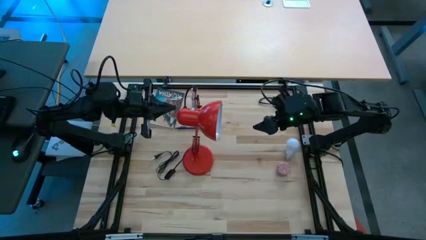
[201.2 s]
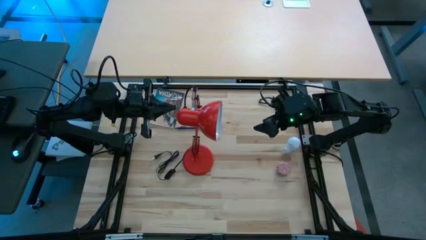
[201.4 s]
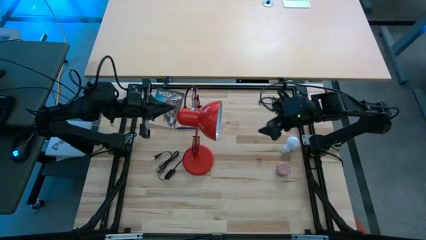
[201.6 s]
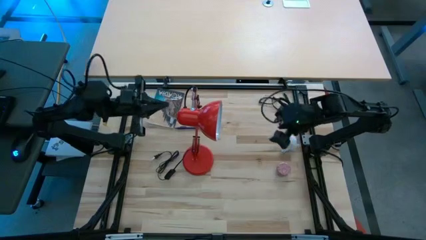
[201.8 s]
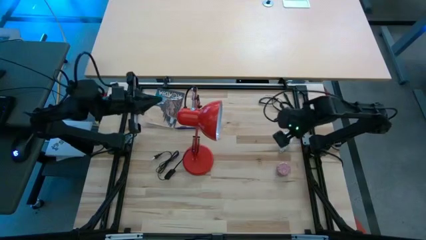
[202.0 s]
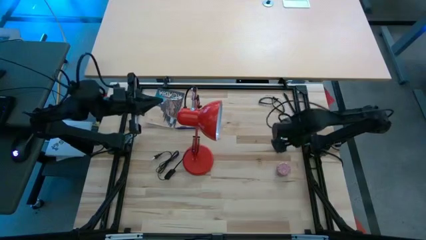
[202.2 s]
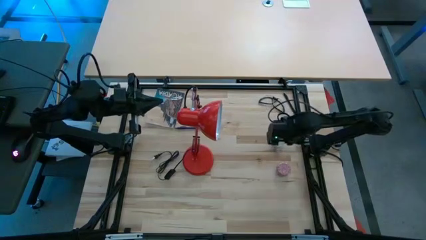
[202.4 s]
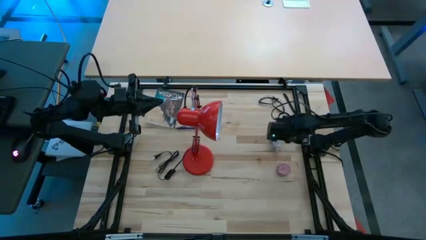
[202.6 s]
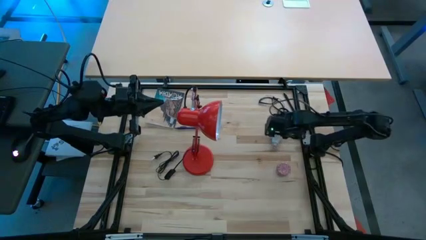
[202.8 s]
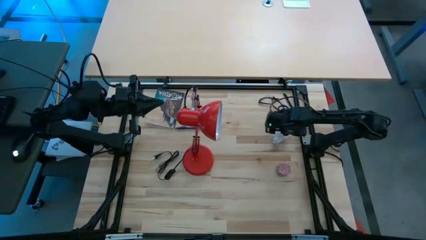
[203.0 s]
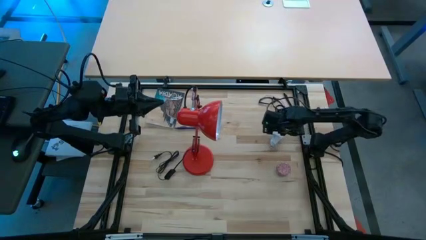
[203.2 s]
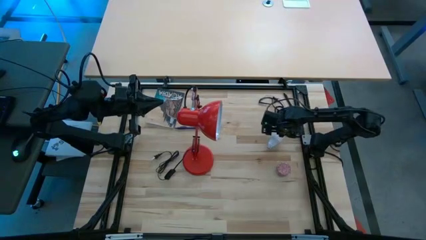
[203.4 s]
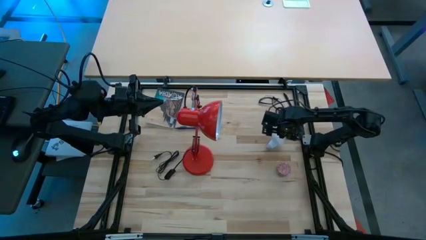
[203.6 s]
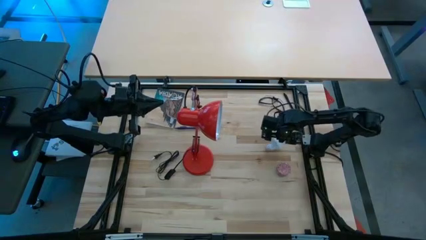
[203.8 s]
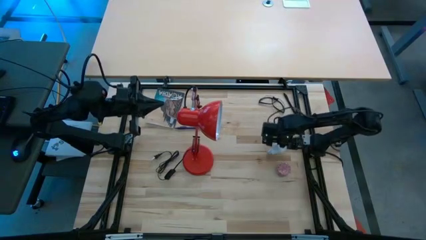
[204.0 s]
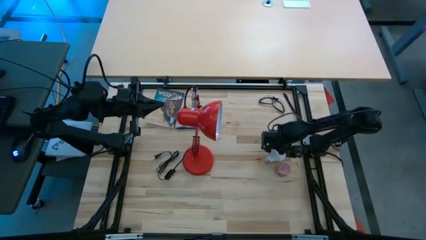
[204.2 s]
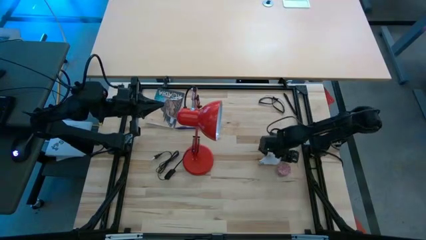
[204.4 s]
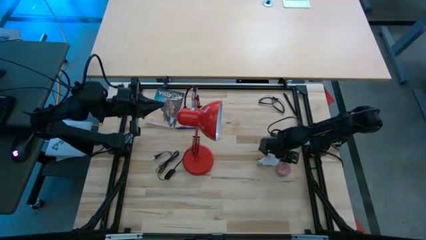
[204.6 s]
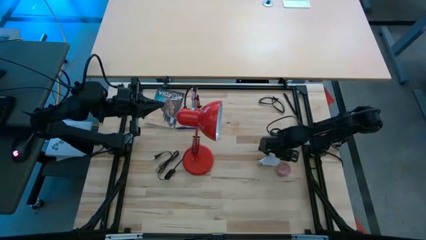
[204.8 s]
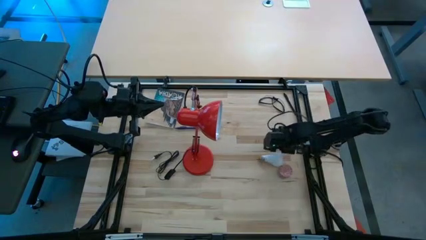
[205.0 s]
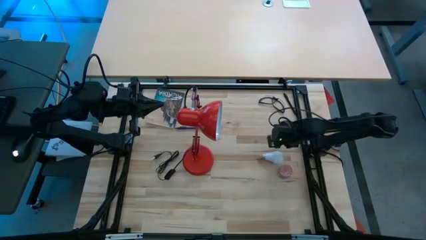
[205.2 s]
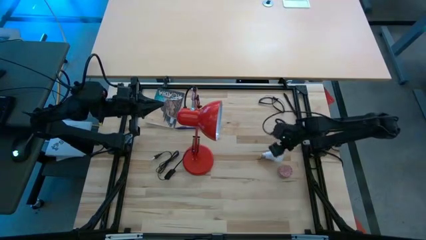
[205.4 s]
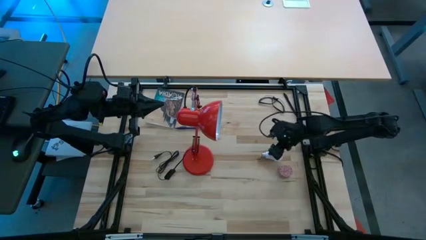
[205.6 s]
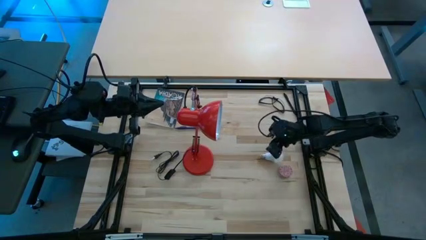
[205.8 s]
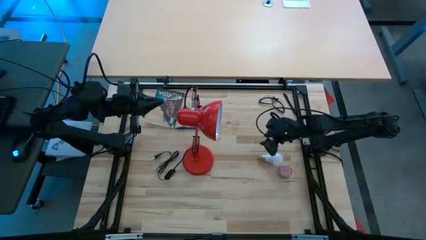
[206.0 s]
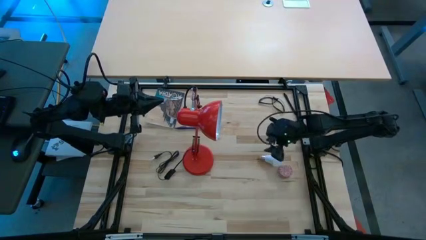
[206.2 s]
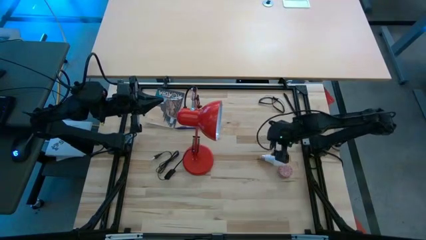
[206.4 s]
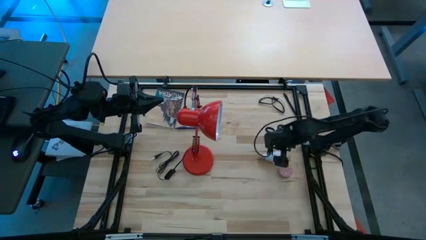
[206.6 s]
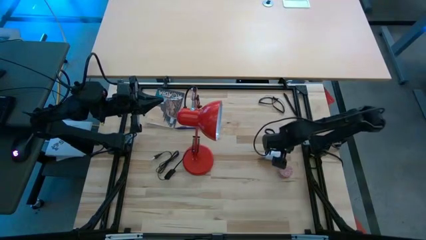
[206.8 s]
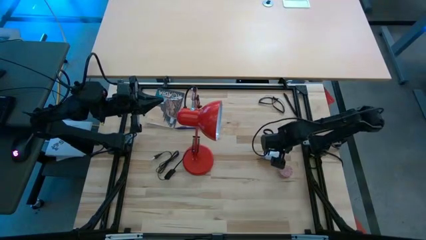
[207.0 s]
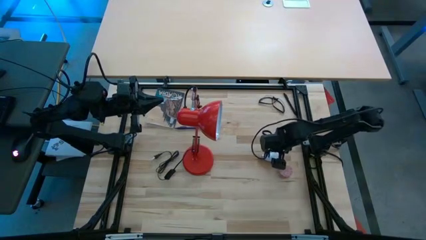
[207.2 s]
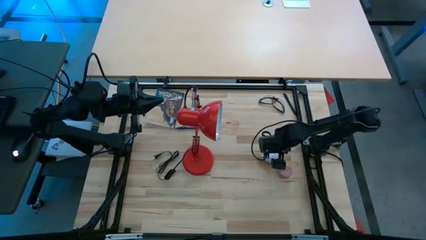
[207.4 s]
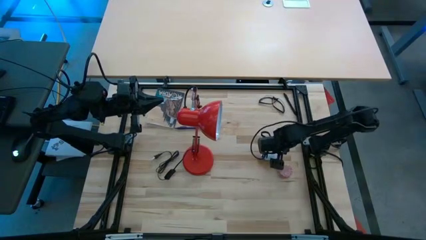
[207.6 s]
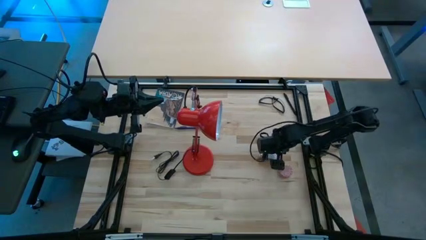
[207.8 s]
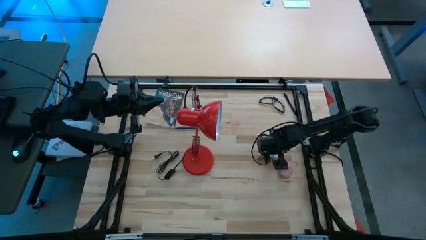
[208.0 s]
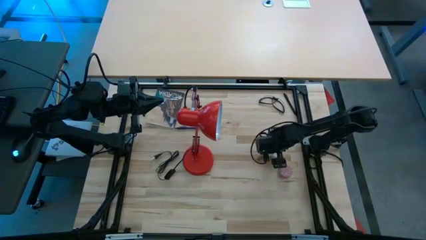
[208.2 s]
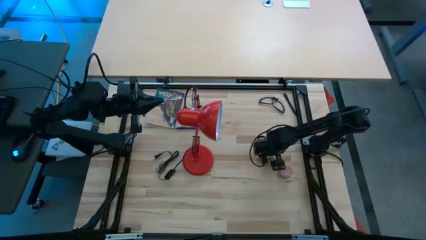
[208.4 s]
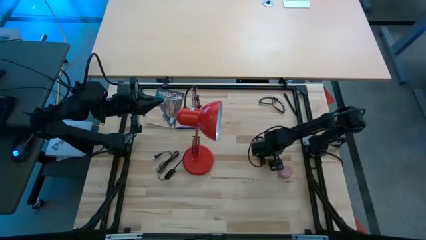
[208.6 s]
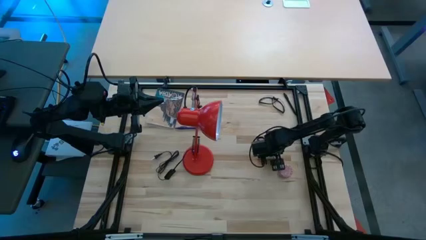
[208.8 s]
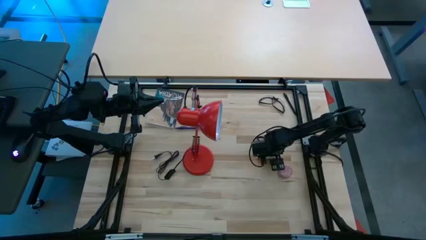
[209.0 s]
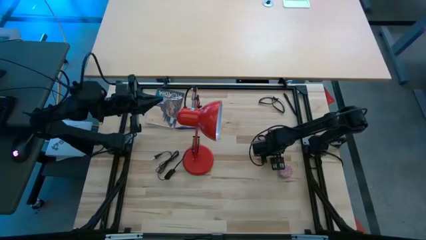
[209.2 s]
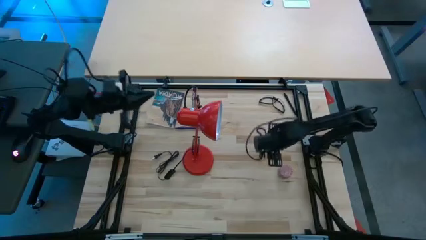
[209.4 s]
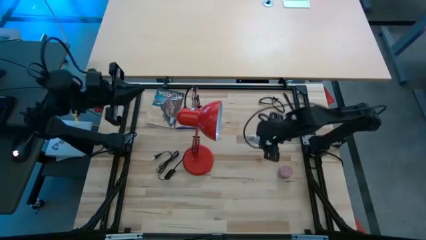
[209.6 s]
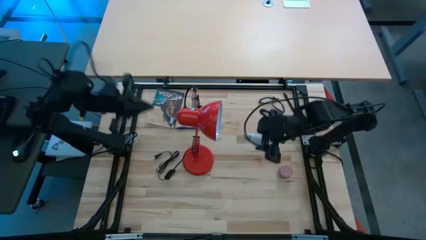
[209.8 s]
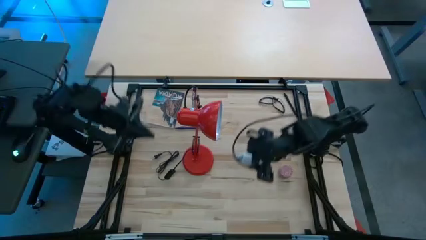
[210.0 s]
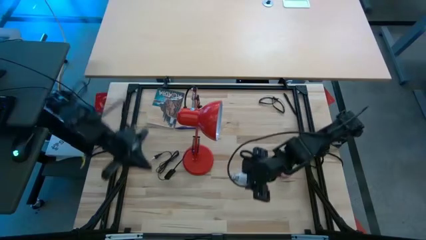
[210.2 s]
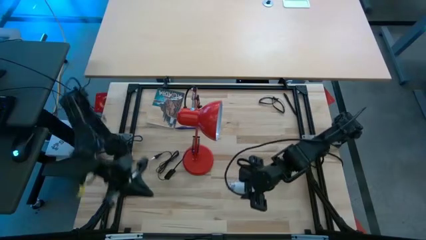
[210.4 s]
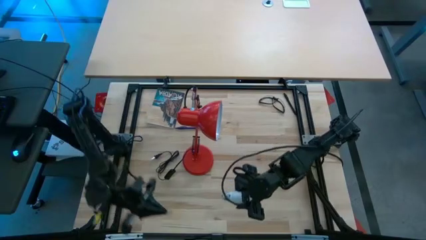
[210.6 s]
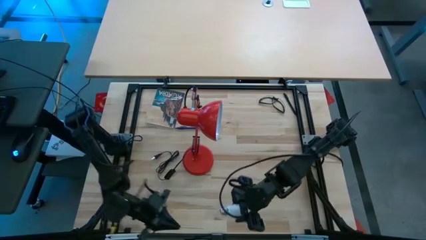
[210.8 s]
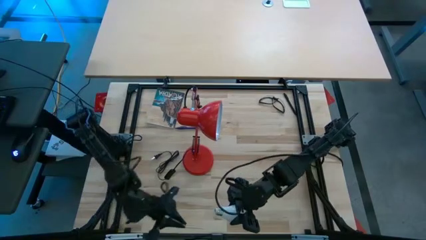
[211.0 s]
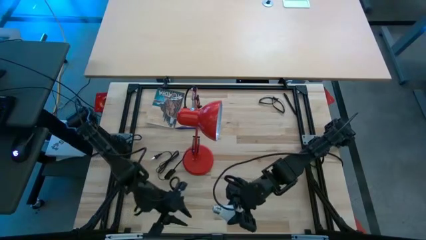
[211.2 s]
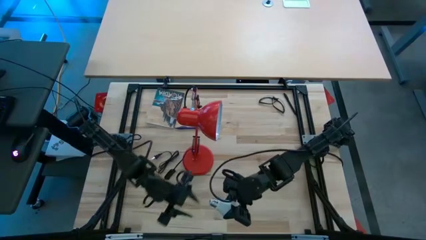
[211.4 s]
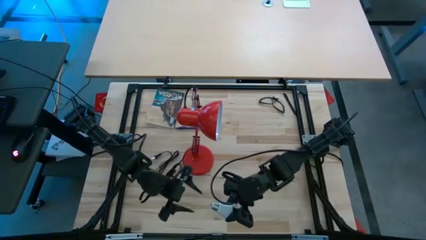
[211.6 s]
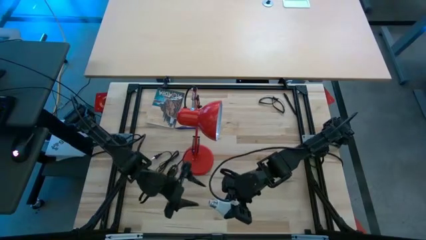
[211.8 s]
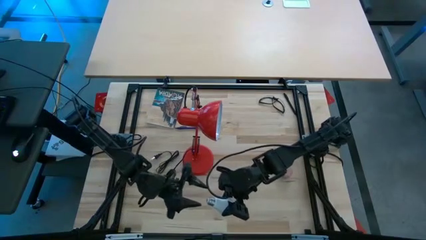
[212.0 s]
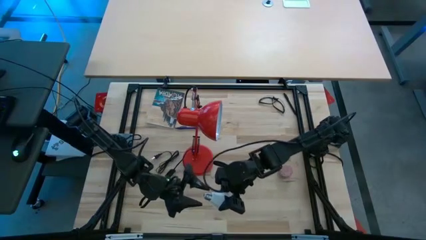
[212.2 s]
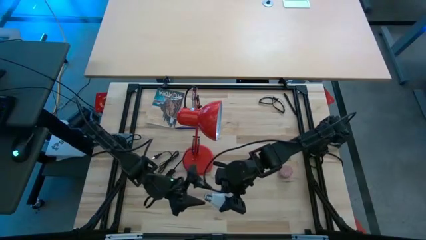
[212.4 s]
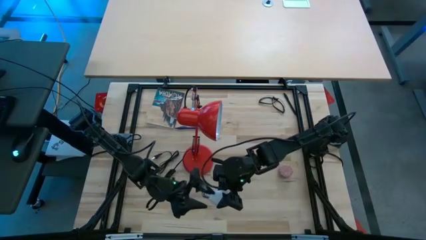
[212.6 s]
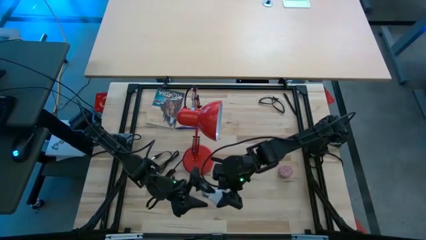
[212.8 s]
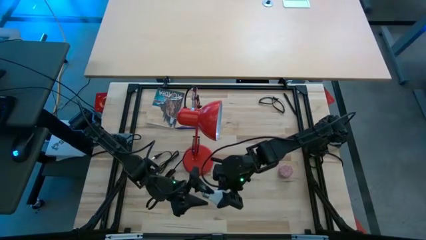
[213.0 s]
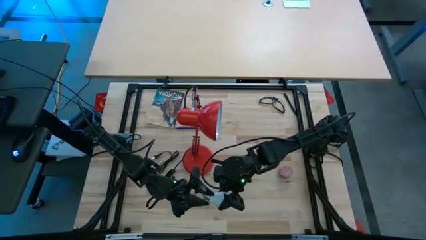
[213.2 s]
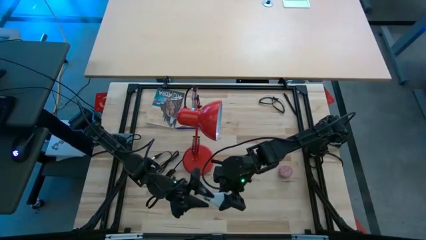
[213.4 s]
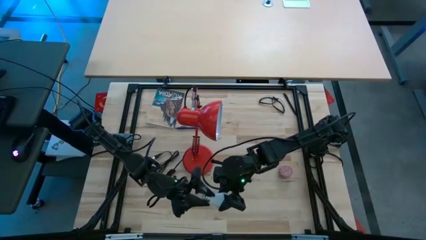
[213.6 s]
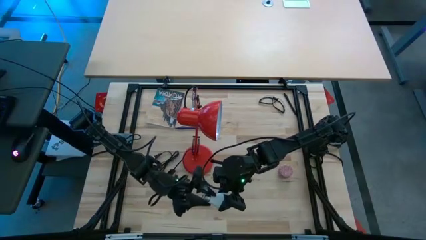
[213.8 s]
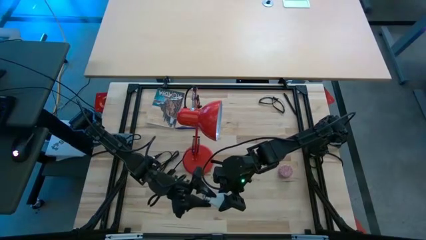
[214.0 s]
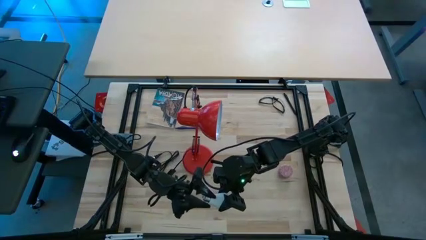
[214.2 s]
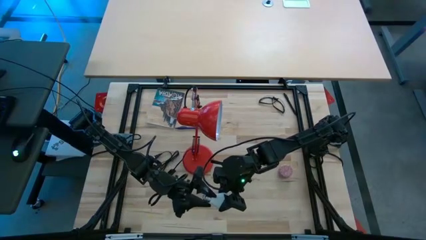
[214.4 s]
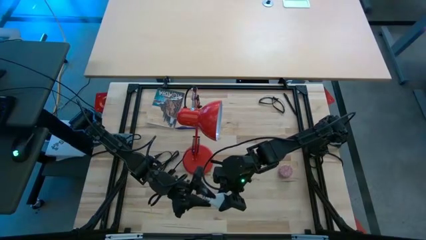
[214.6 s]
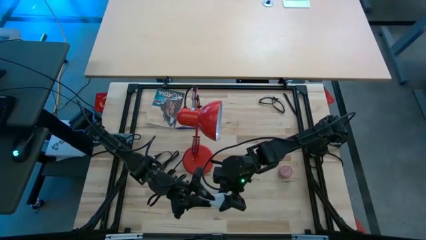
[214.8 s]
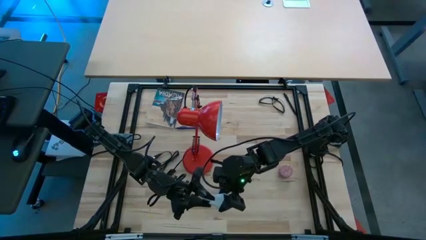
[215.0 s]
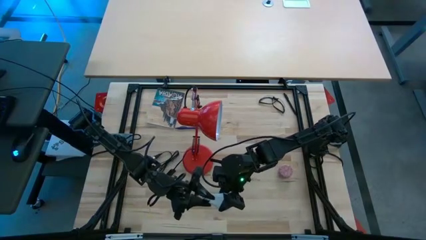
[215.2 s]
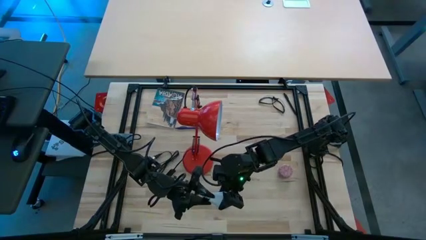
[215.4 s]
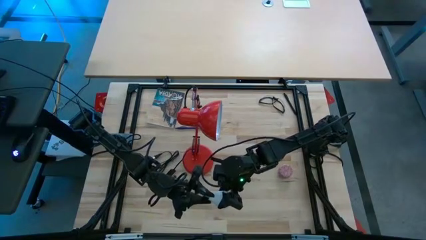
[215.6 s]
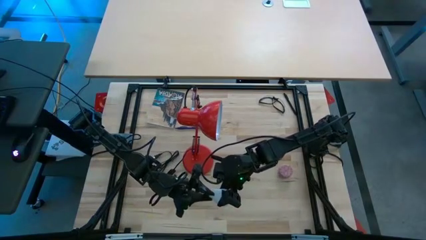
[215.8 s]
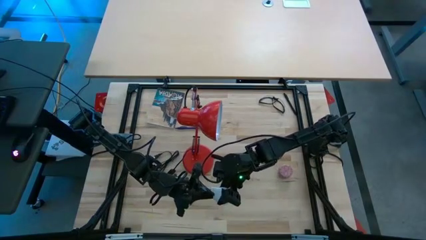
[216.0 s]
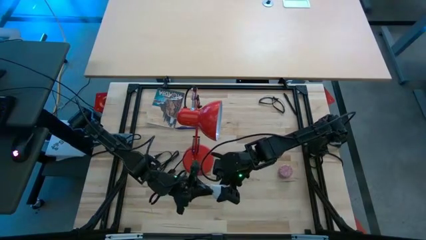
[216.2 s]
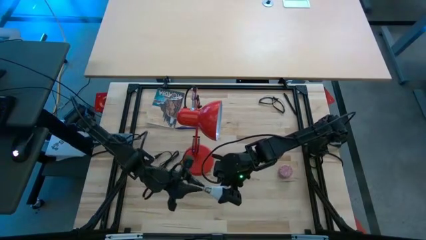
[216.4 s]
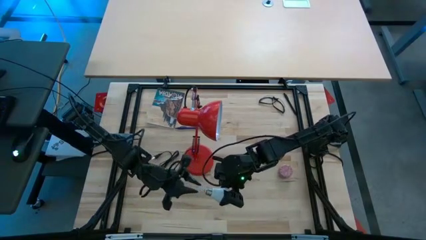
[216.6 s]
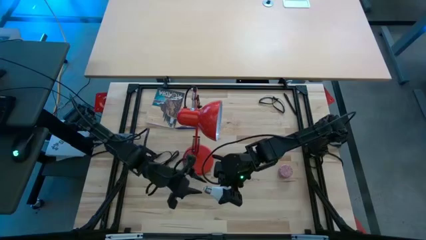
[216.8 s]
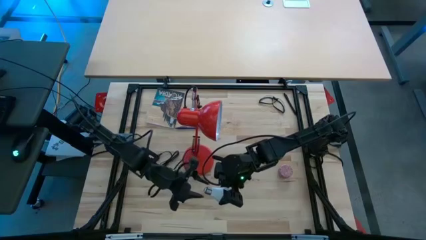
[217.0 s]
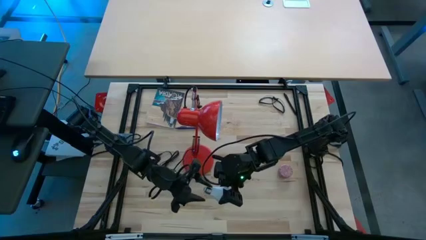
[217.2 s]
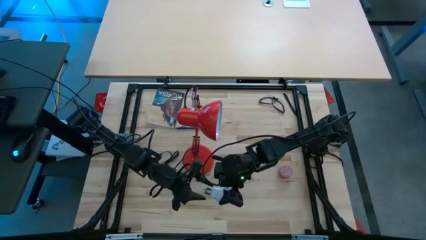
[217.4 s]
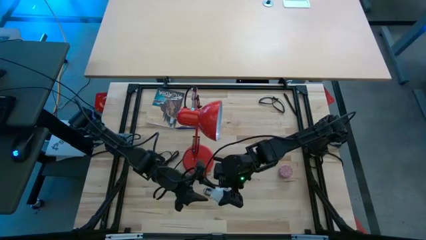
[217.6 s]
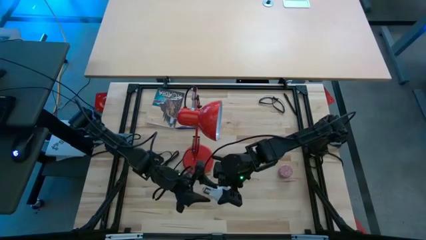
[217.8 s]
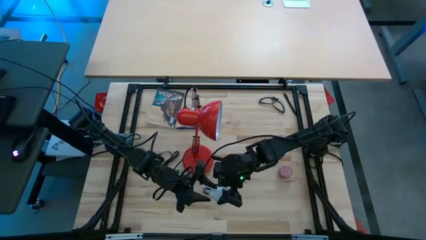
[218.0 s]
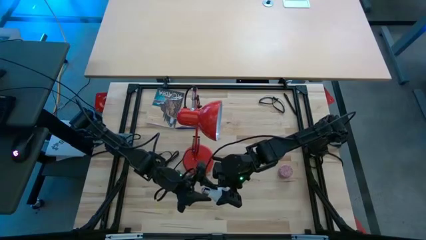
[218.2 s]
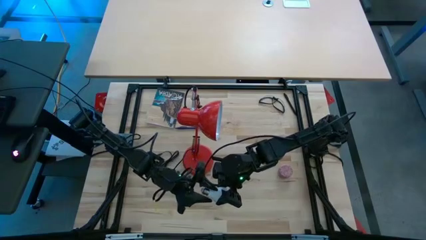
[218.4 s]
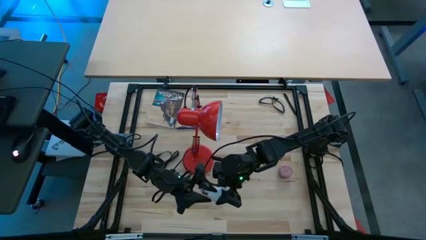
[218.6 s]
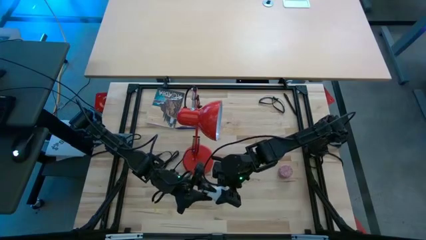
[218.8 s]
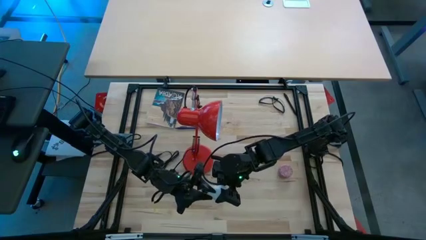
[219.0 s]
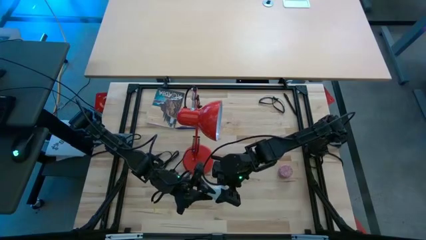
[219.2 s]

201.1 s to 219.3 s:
Task: Screw lightbulb
Insert the lightbulb on the lamp
